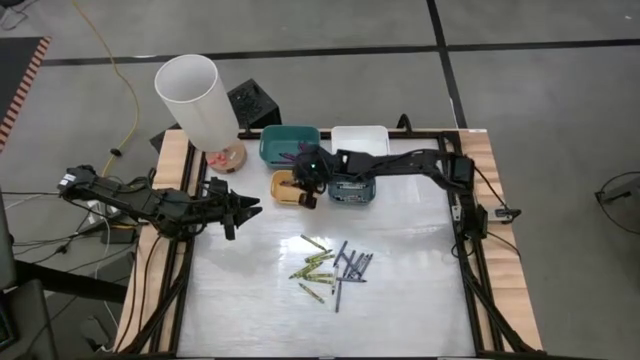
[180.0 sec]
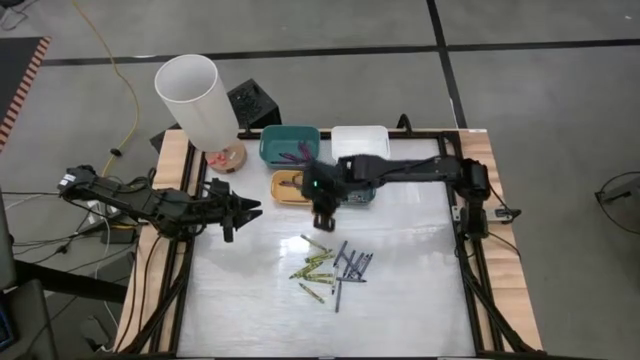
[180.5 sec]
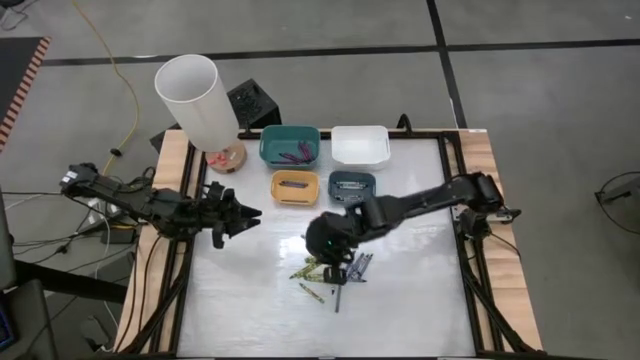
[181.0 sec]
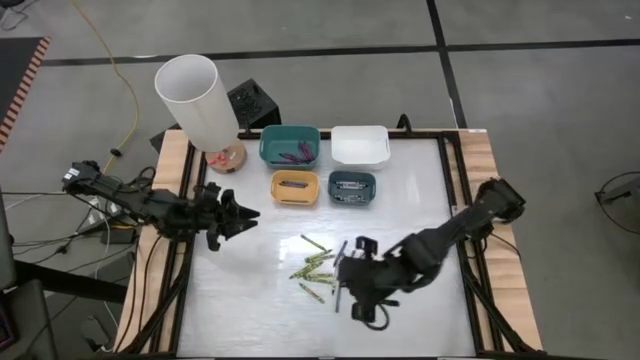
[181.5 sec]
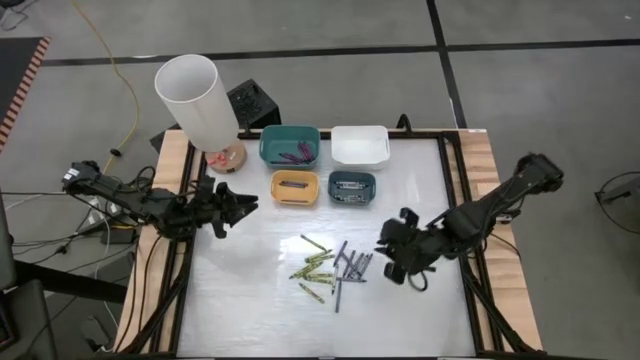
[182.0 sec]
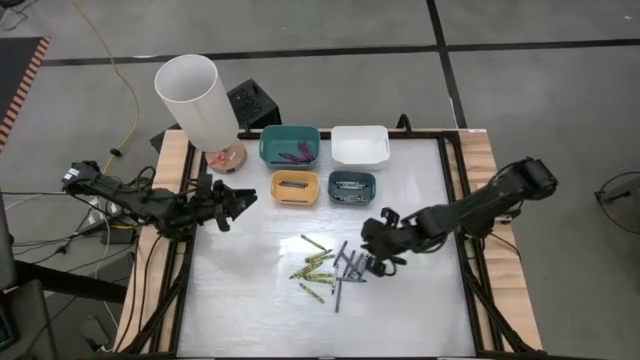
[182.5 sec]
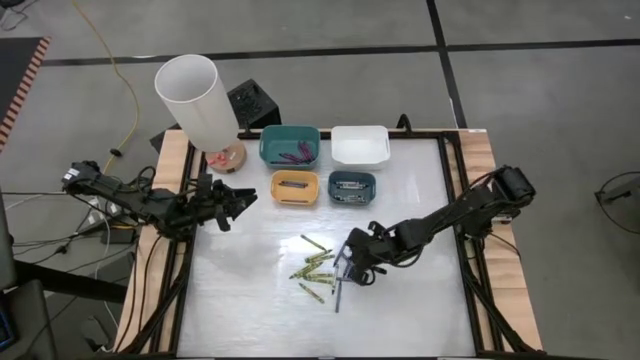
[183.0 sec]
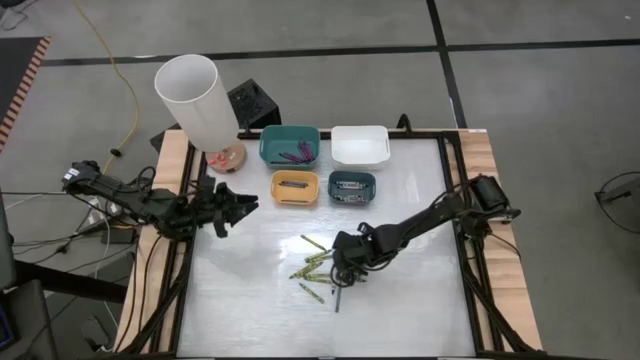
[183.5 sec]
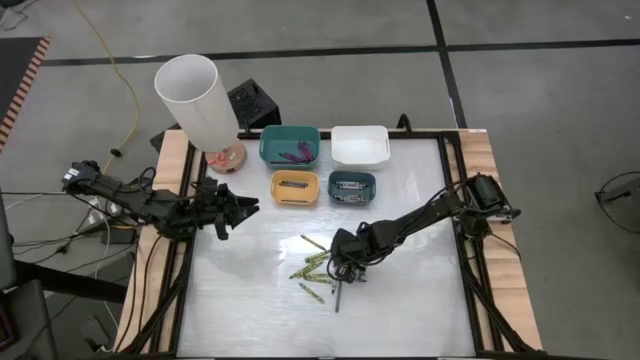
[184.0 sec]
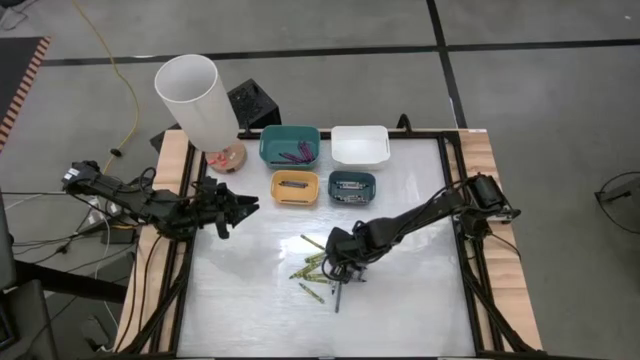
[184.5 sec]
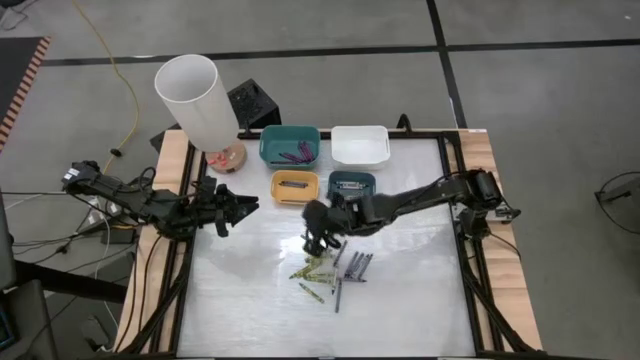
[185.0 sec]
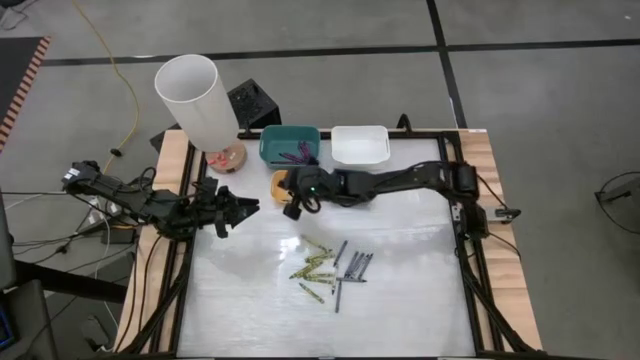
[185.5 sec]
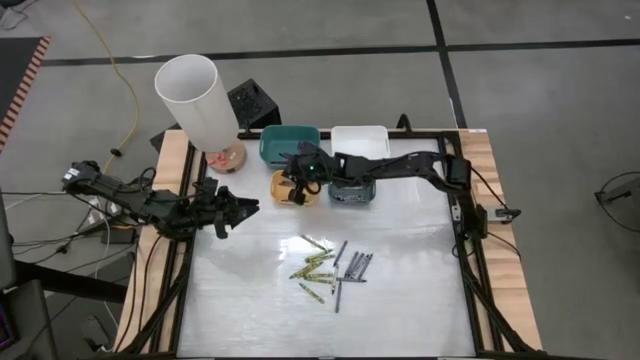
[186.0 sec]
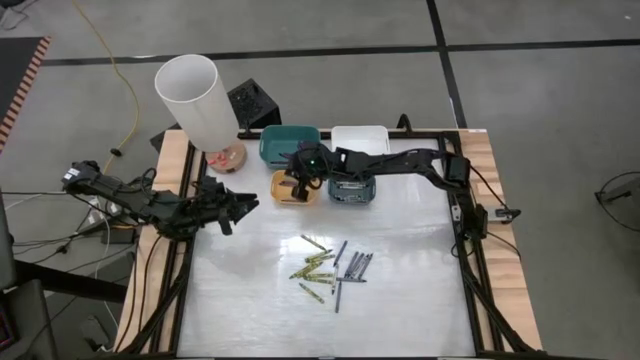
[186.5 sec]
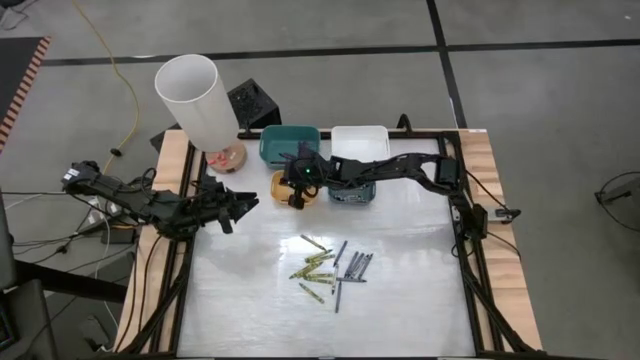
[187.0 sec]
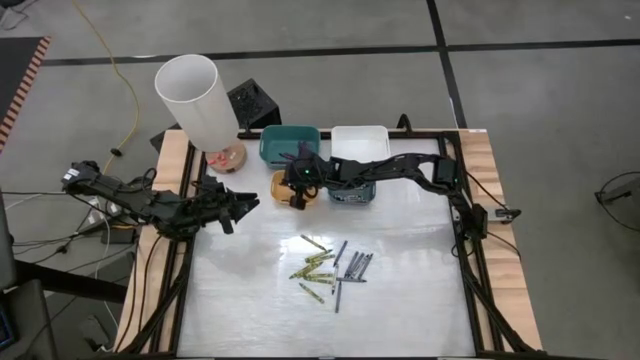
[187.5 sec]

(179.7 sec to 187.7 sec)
Task: Sort crayons
Put the blue crayon into the yellow bin

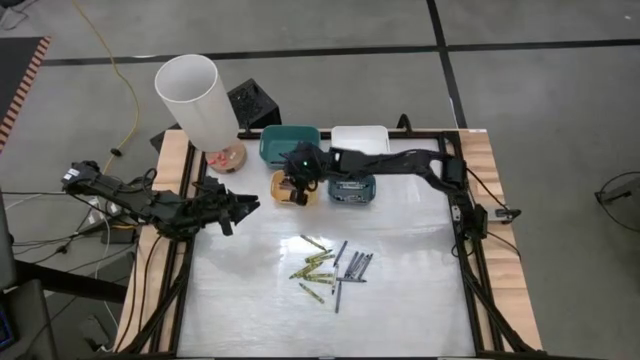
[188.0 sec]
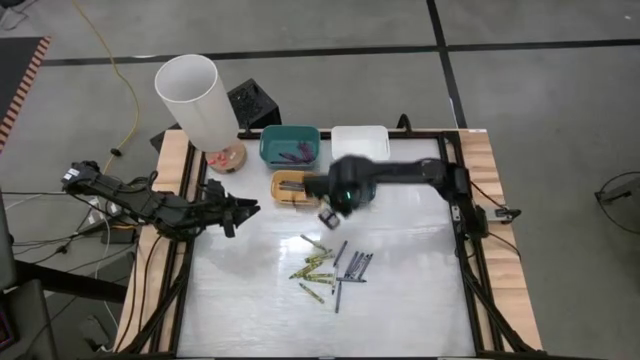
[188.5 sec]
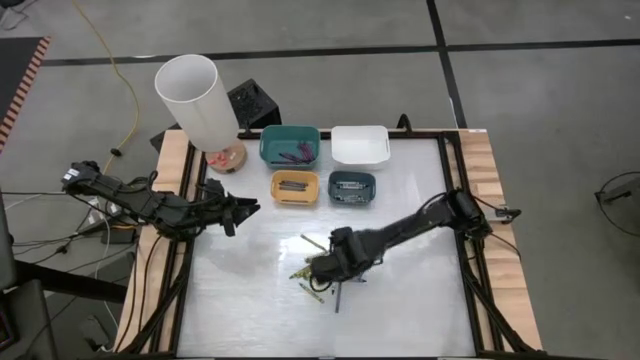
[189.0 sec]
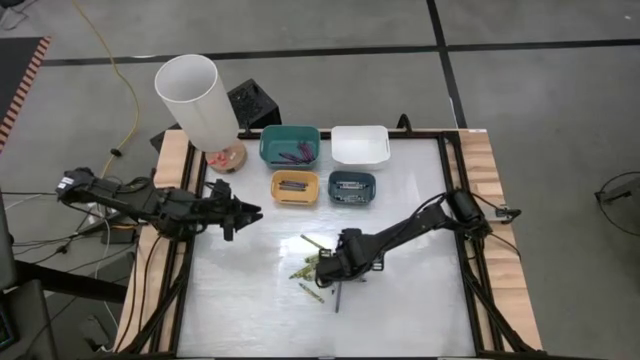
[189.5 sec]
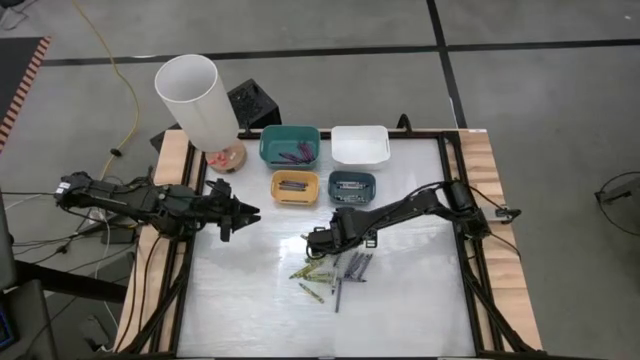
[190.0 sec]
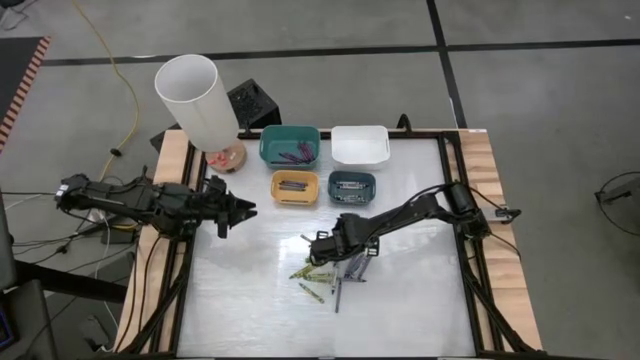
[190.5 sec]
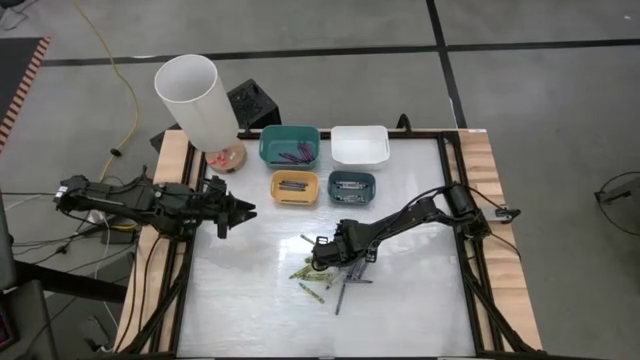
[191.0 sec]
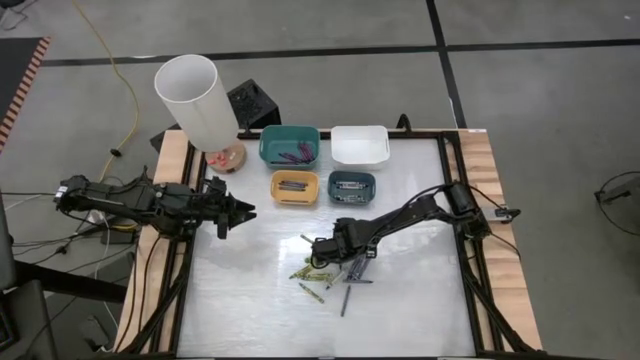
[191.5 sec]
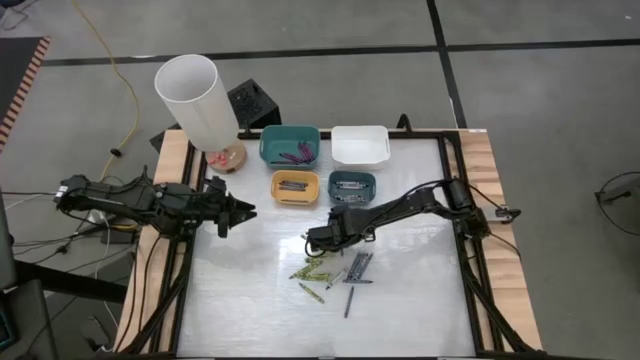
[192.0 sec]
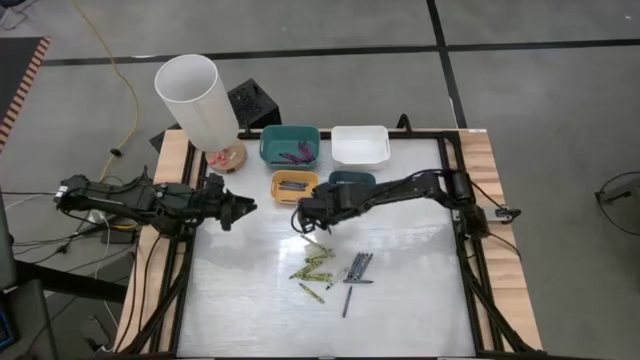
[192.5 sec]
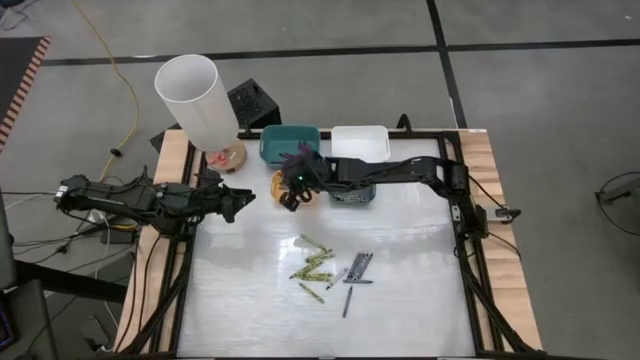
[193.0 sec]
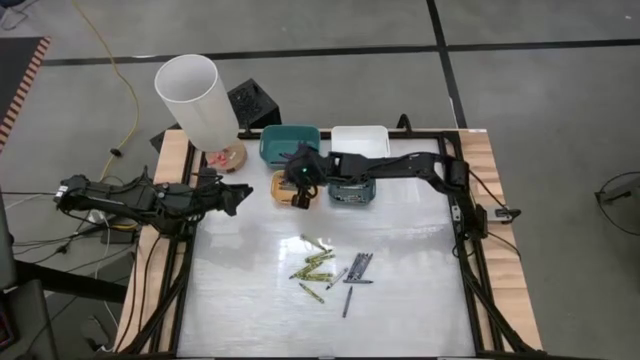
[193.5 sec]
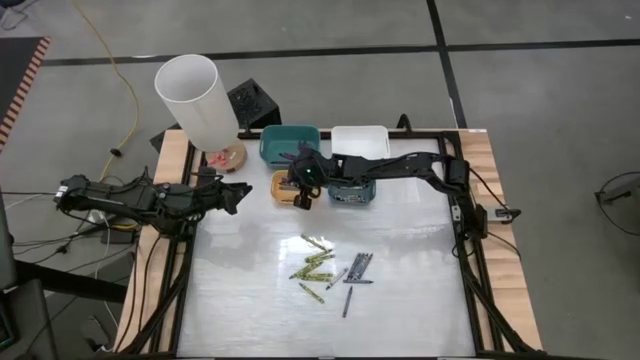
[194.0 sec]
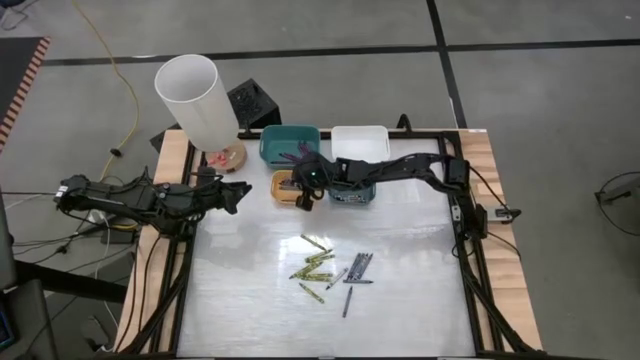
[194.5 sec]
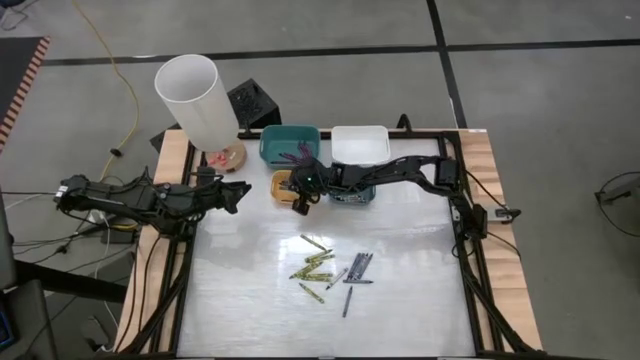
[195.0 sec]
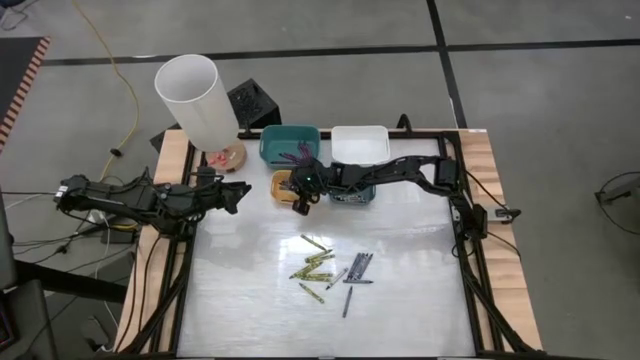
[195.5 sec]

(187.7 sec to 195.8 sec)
Put the blue crayon into the yellow bin

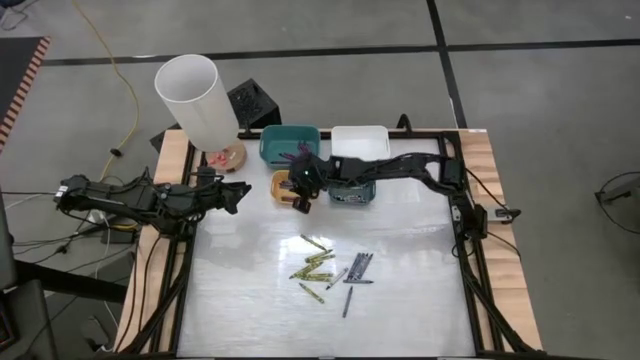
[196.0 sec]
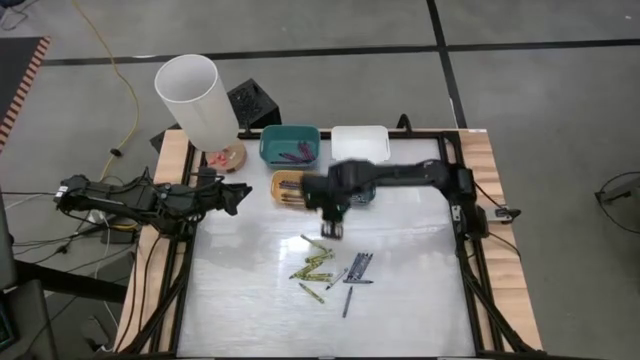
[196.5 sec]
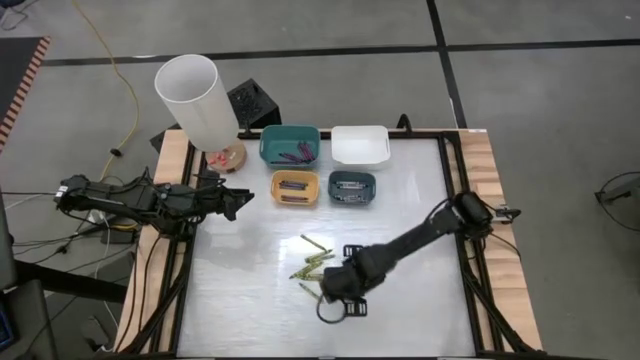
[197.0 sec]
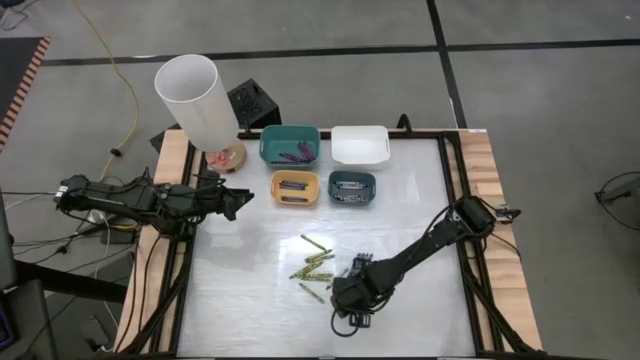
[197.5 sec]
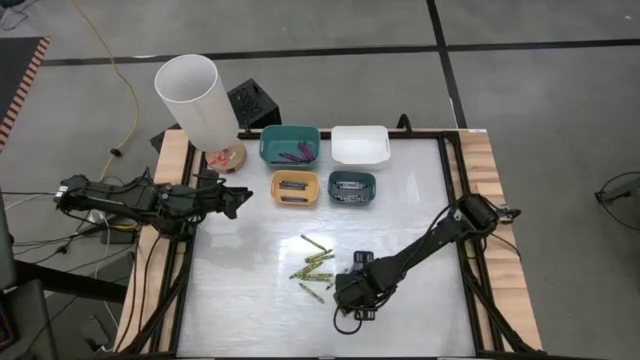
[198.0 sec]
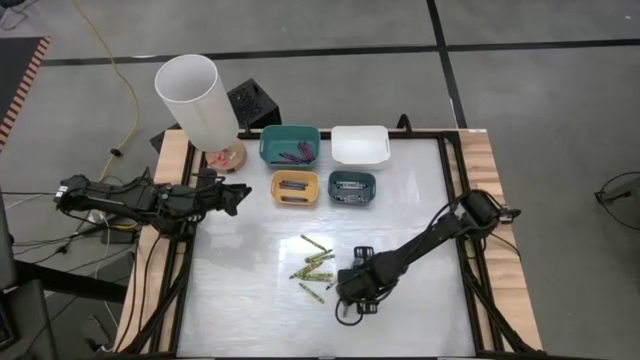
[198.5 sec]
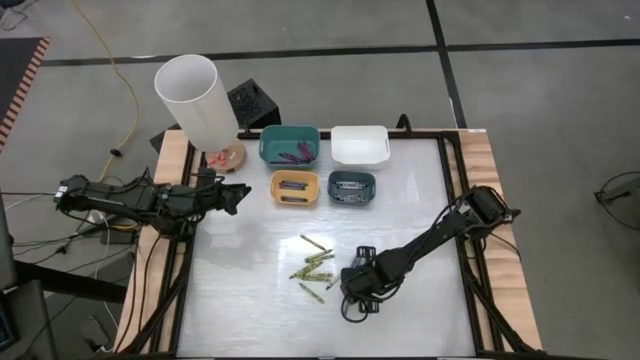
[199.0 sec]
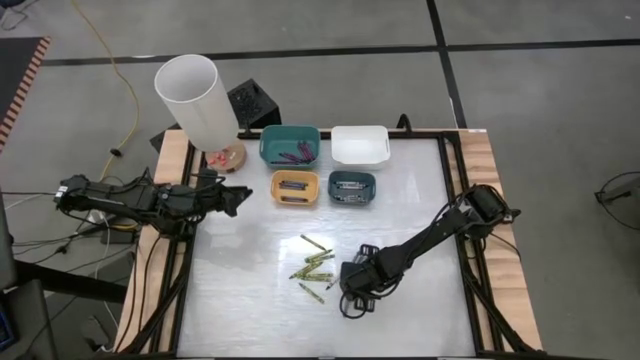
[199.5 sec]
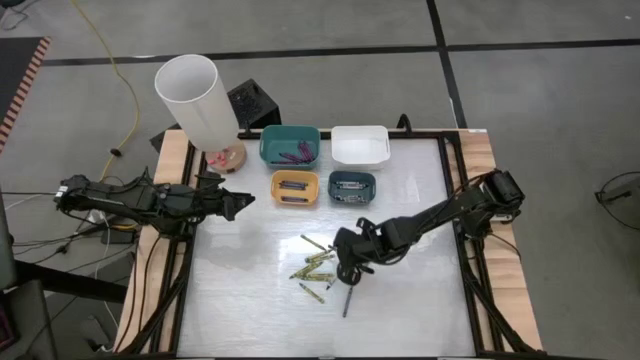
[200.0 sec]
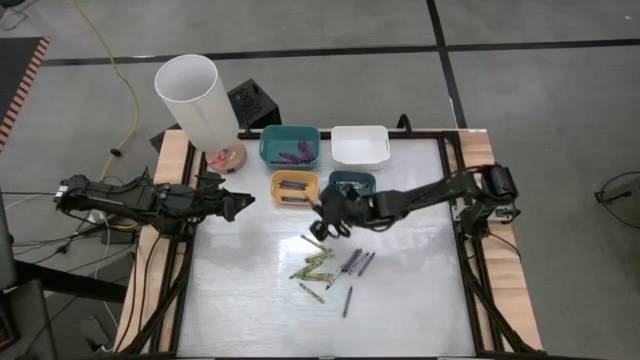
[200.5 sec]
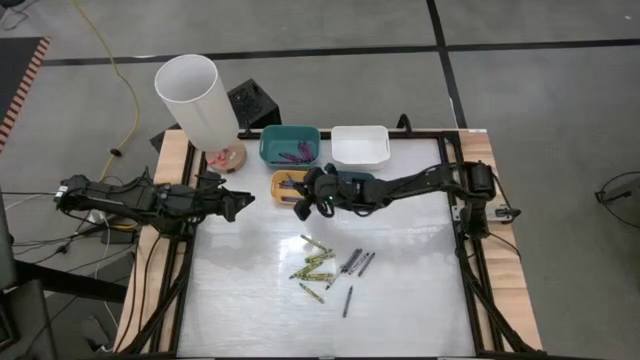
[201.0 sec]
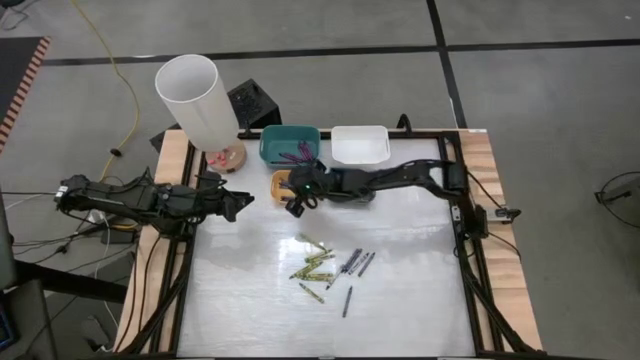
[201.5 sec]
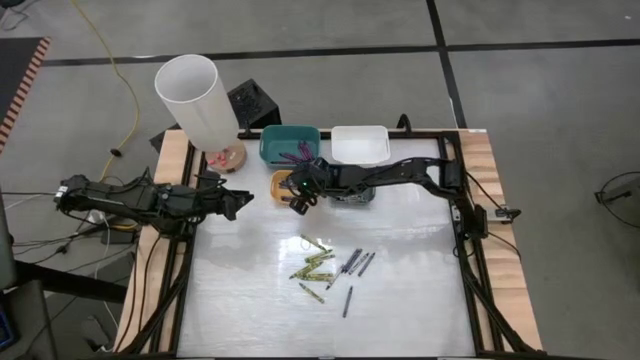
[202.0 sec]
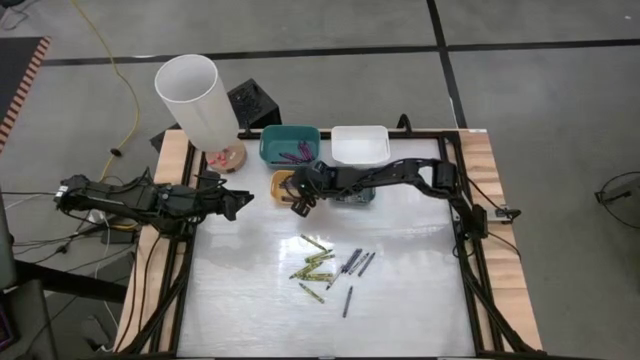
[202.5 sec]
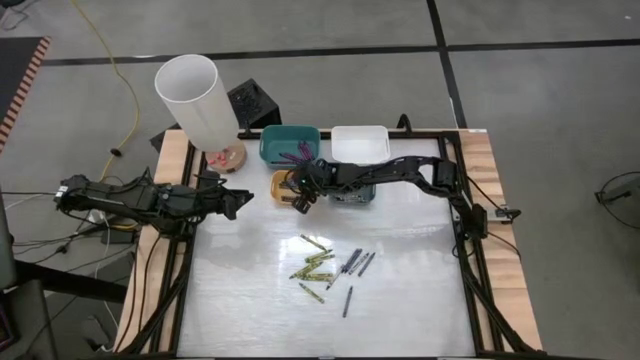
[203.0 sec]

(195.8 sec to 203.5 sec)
Put the blue crayon into the yellow bin
